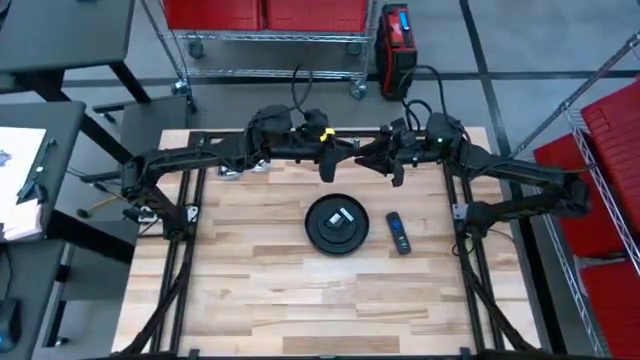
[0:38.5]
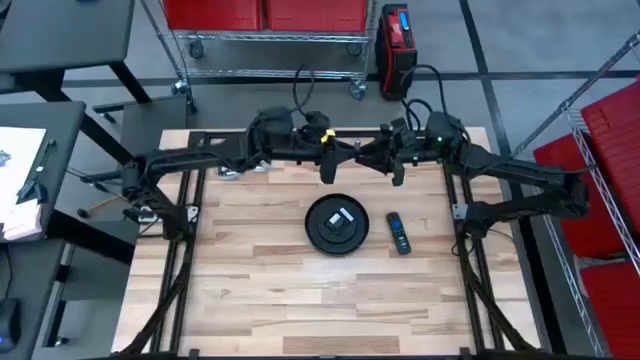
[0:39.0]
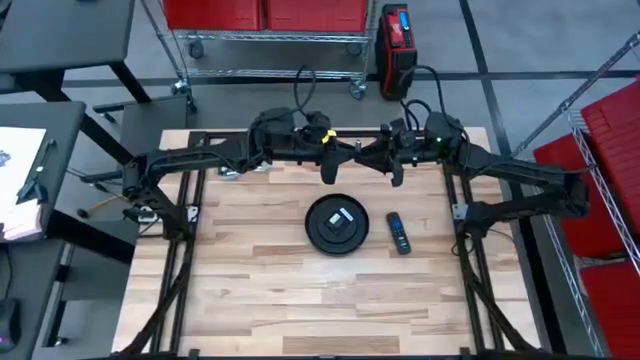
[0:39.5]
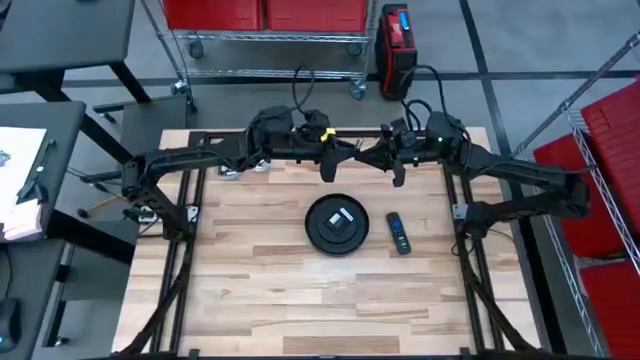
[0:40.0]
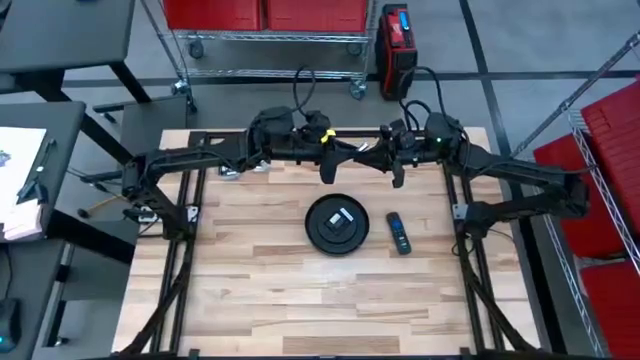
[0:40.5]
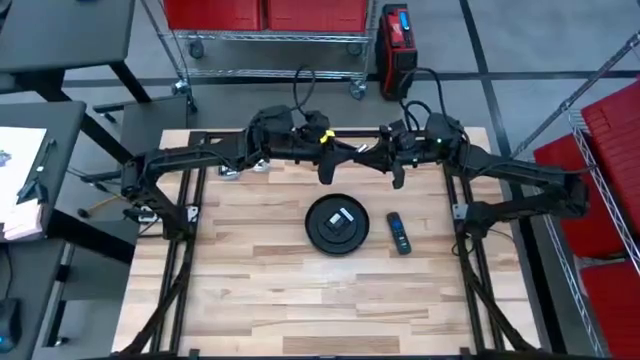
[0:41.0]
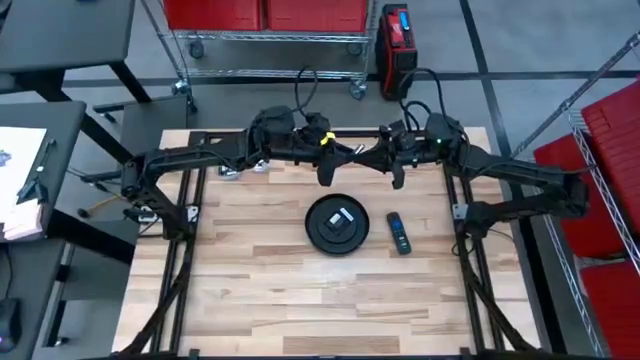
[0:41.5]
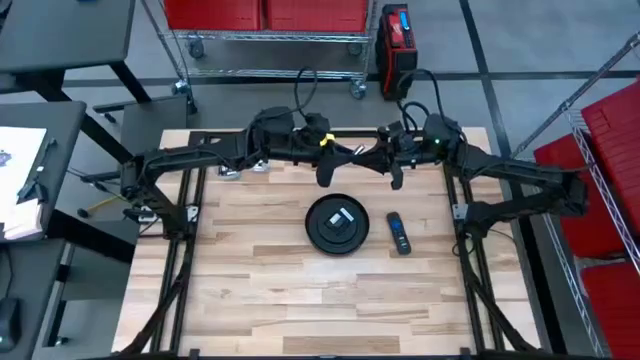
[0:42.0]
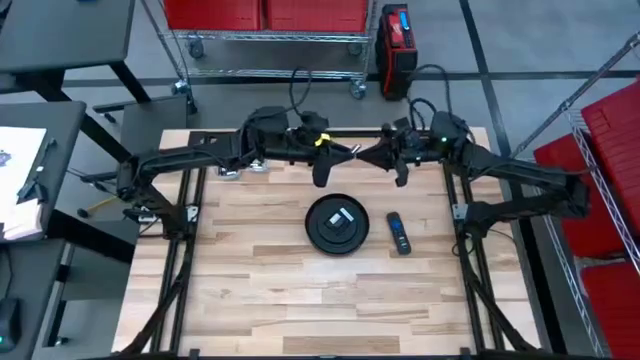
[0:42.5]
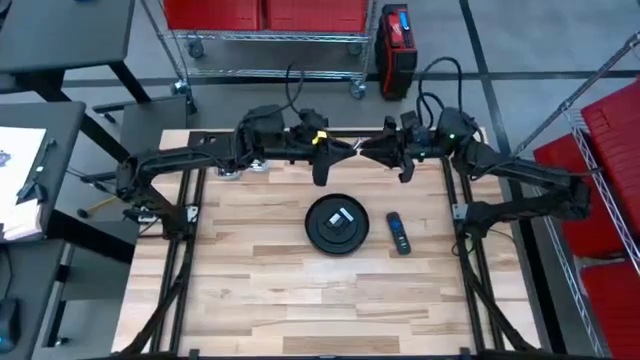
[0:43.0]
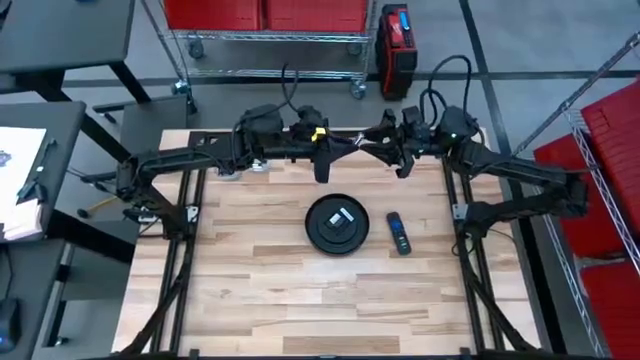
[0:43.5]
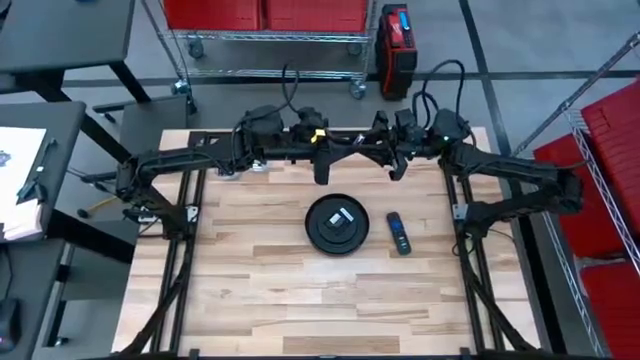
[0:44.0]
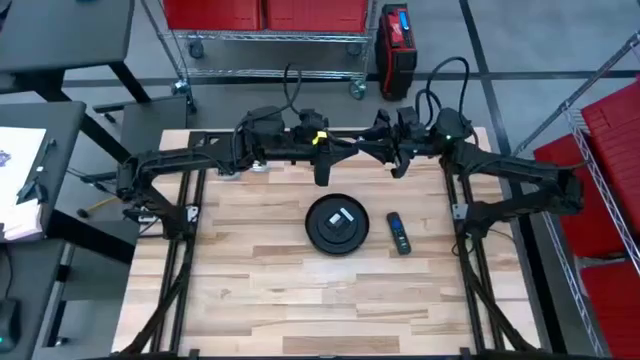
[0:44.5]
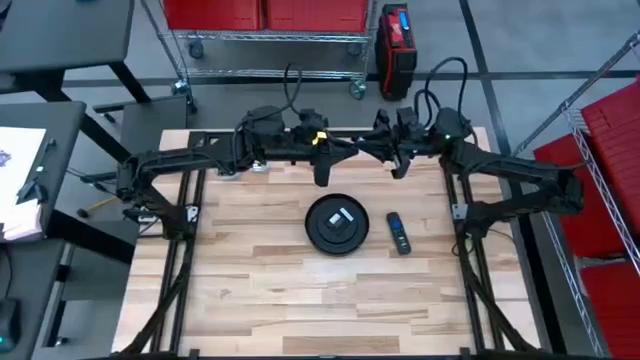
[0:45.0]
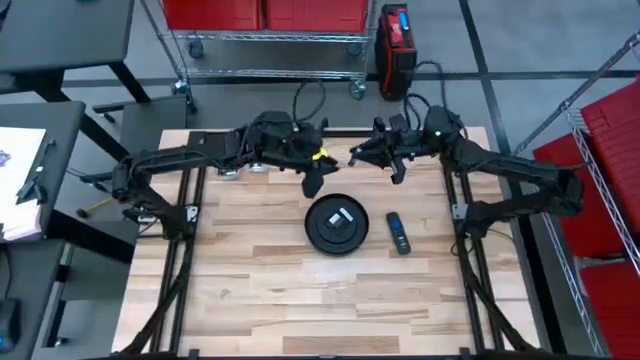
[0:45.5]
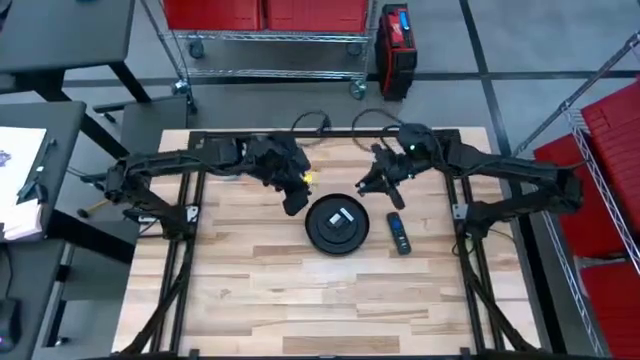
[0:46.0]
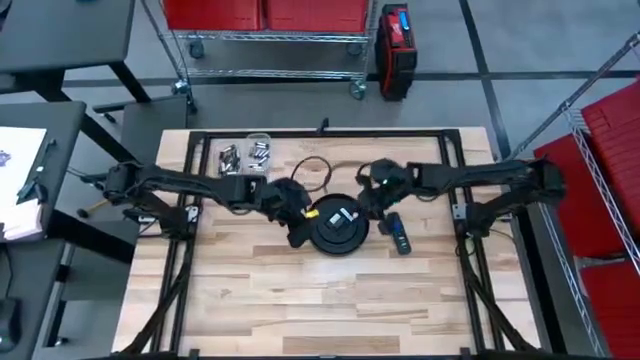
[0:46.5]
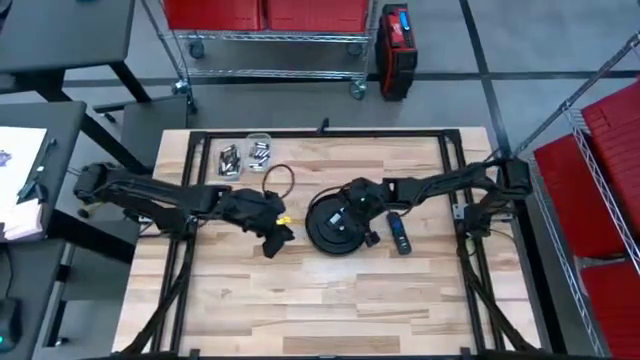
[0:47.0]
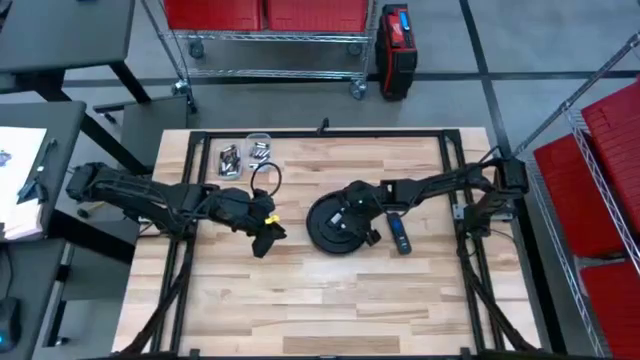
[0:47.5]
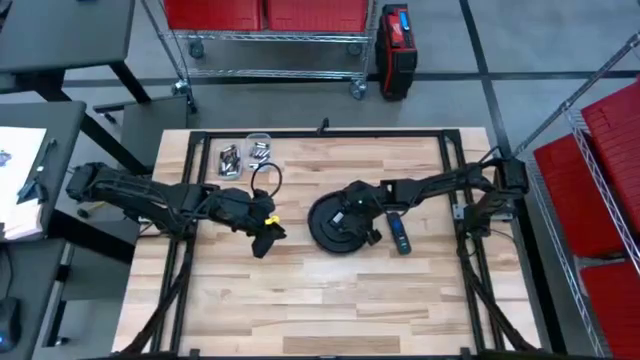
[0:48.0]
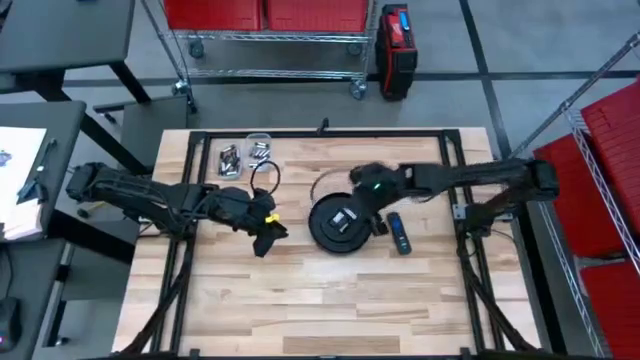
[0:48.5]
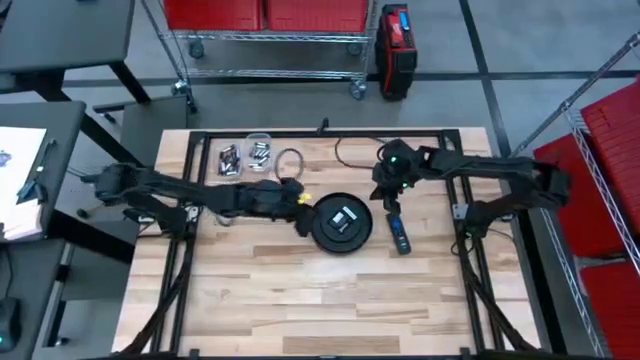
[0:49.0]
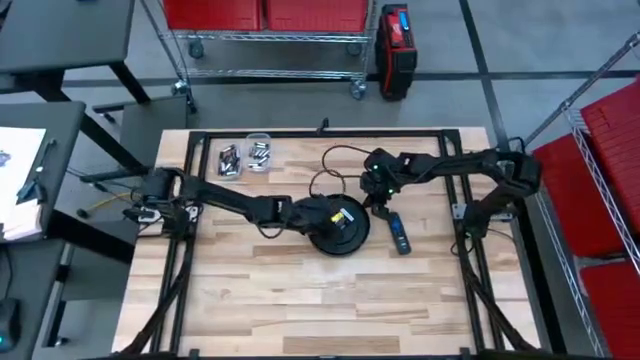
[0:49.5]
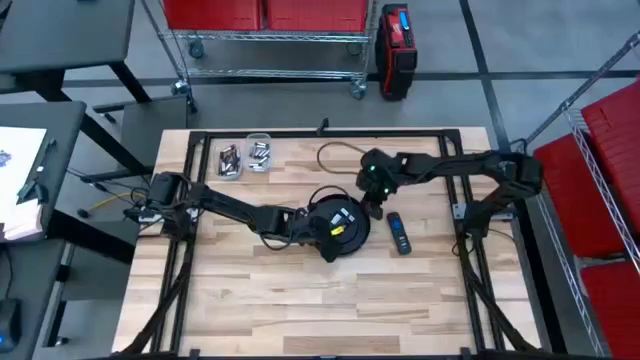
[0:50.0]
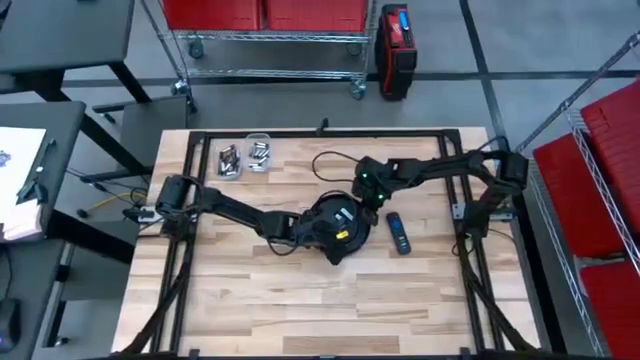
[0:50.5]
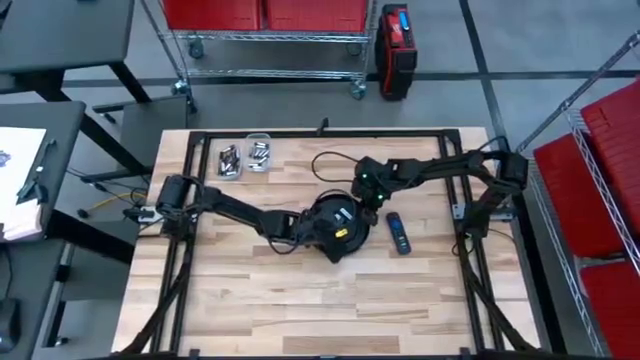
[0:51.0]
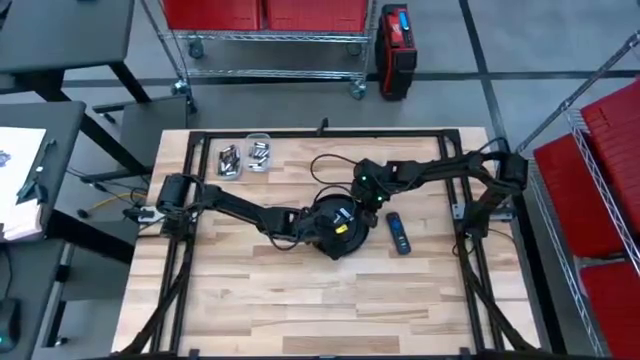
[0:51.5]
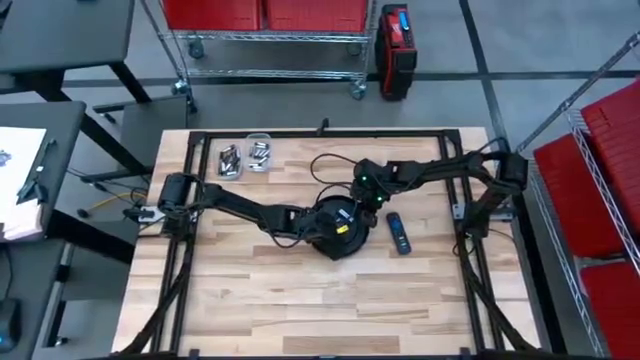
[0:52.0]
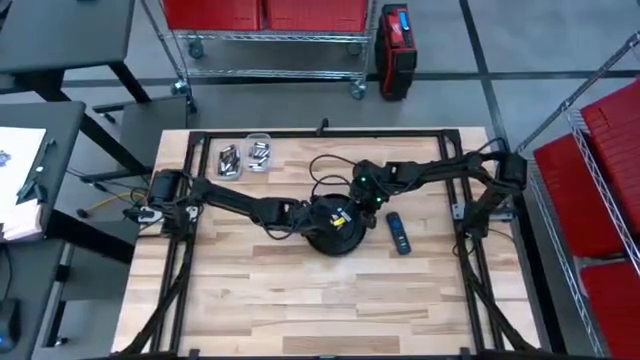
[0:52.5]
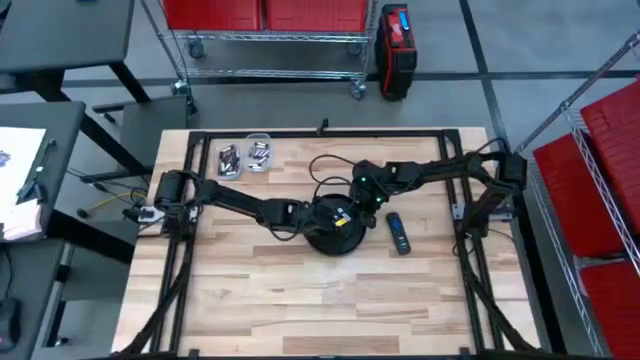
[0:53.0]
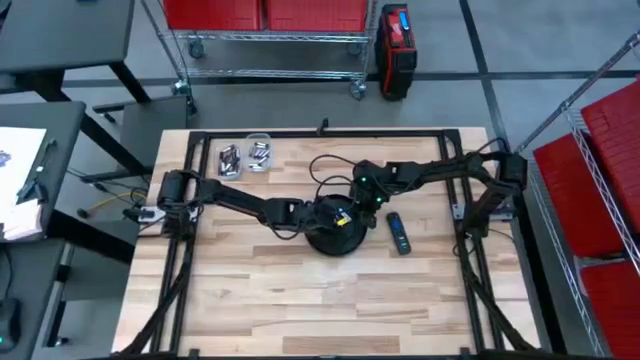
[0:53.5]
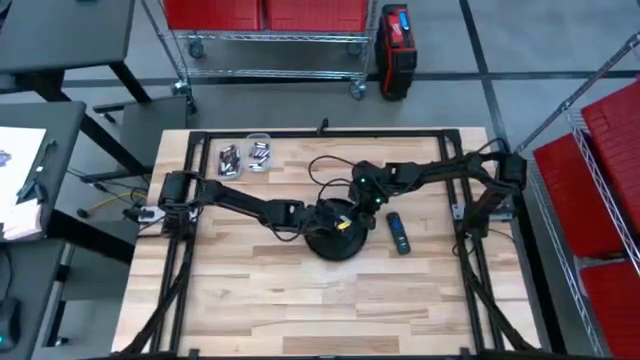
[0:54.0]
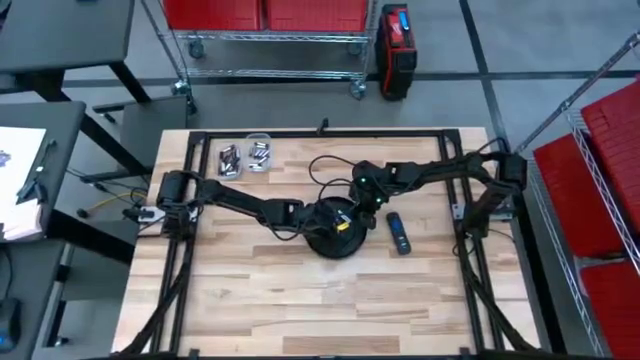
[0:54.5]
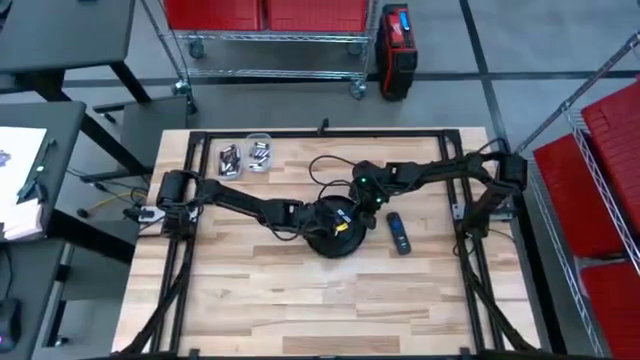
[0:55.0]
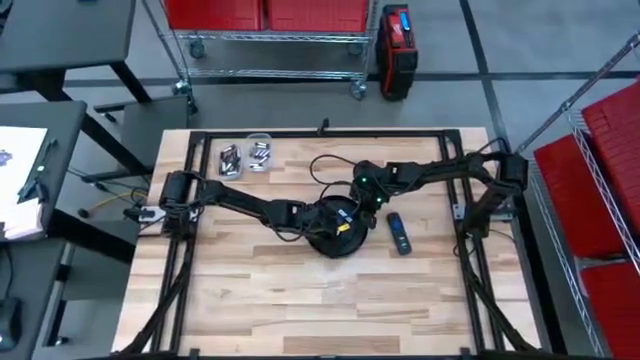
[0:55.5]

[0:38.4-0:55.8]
Task: Insert battery
Insert the silver battery into the wall clock battery compartment

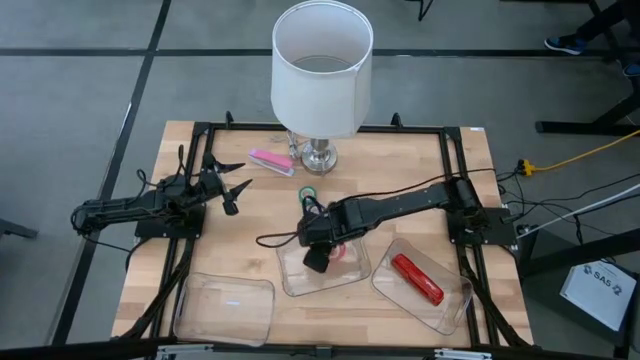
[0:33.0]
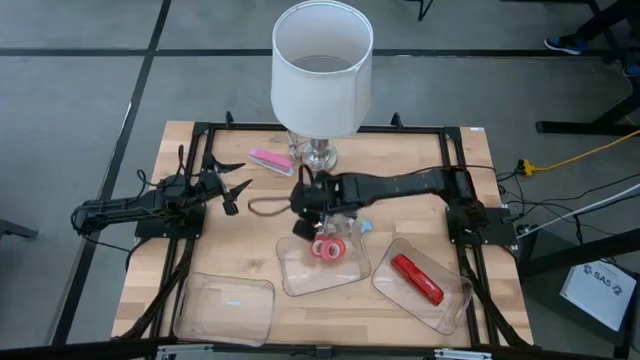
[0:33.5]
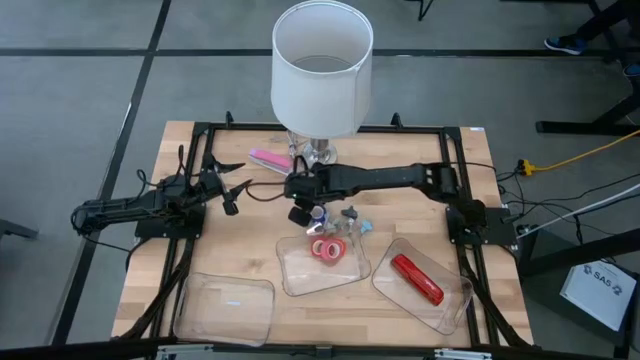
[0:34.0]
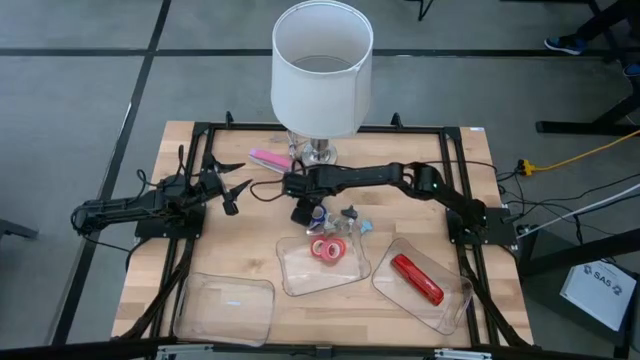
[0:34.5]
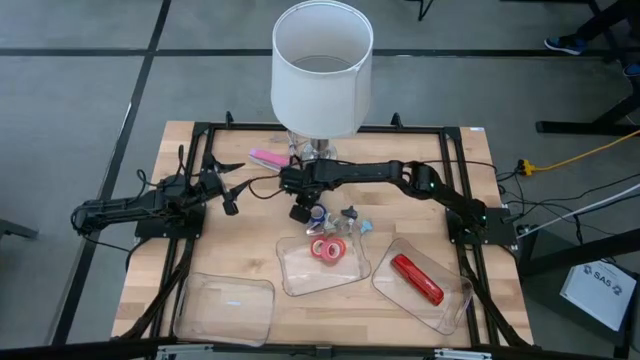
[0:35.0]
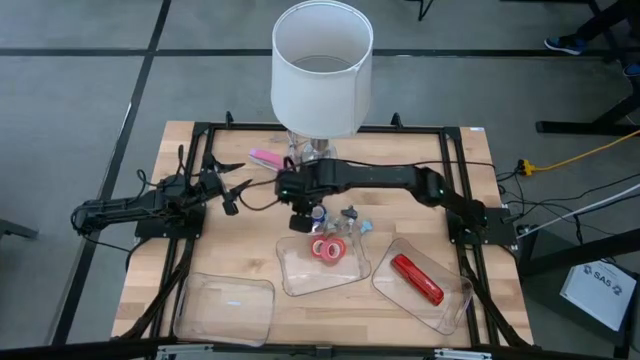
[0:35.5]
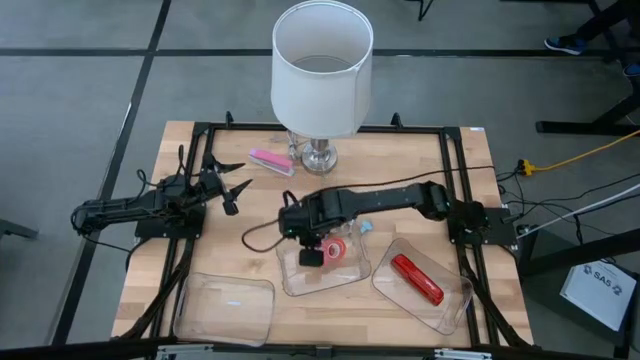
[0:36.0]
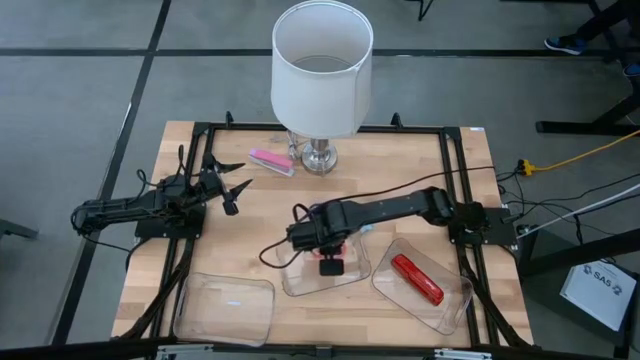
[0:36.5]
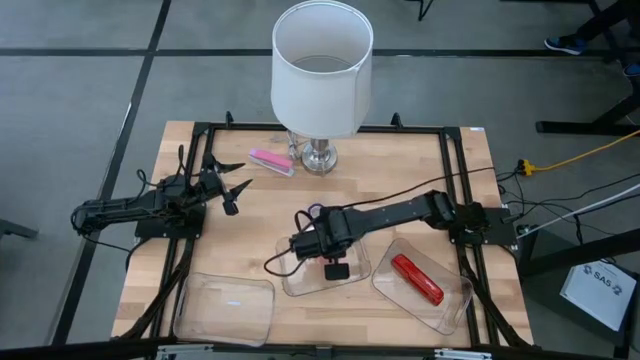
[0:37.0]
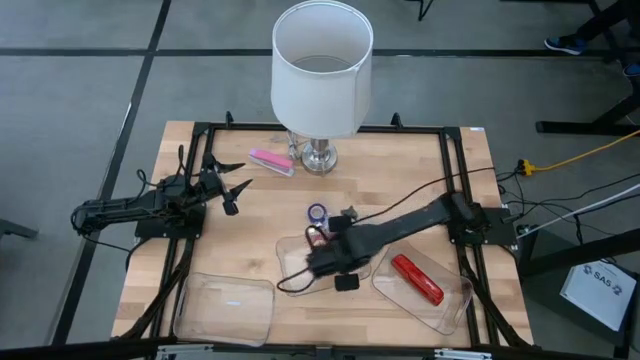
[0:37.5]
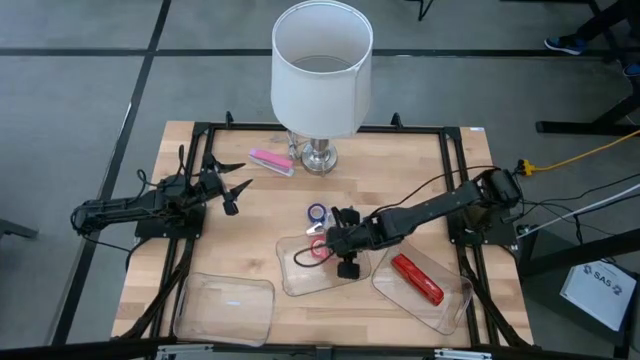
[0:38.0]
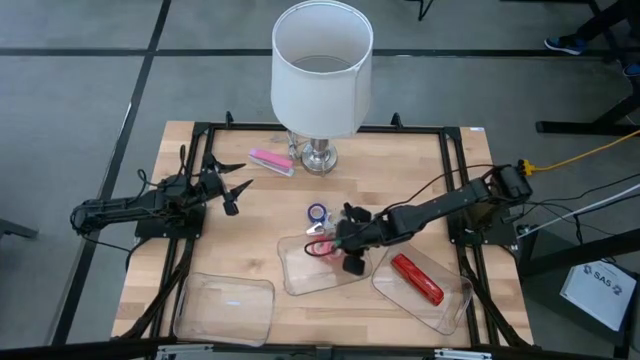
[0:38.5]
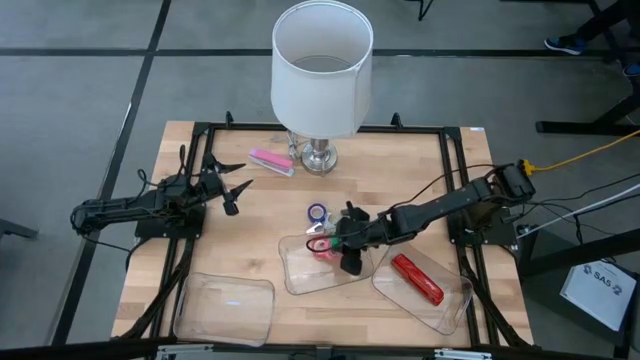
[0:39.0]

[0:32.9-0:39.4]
Task: Pick and place Stapler, Stapler remover, tape
Put the green tape into the top transparent bin
